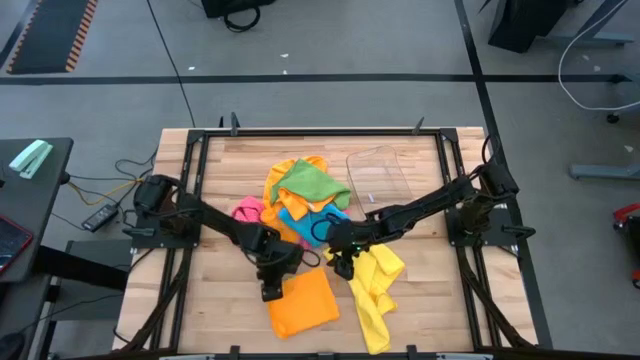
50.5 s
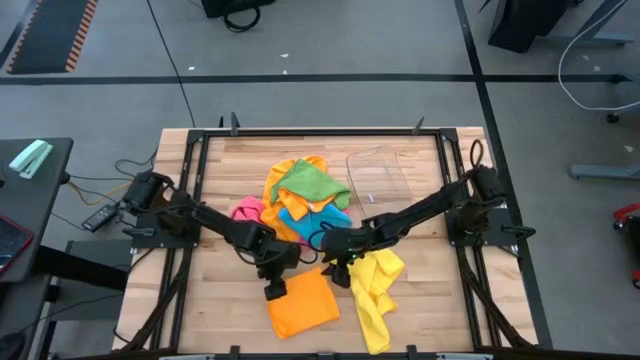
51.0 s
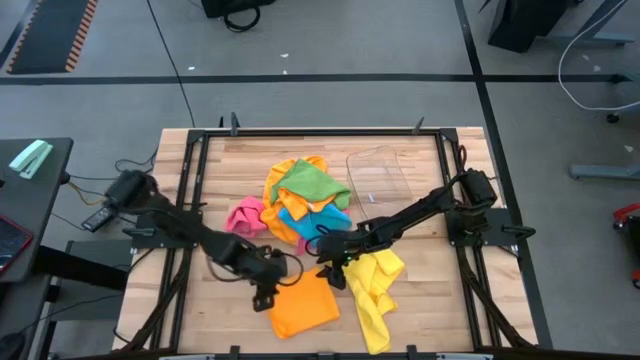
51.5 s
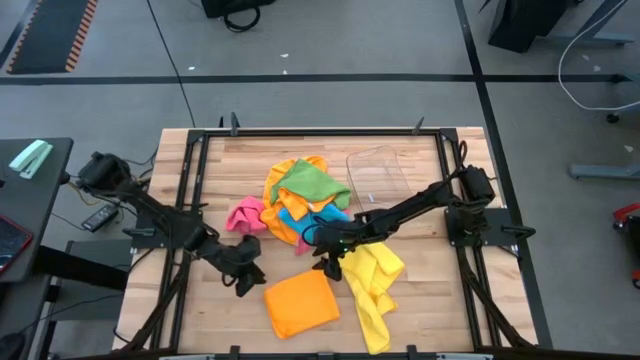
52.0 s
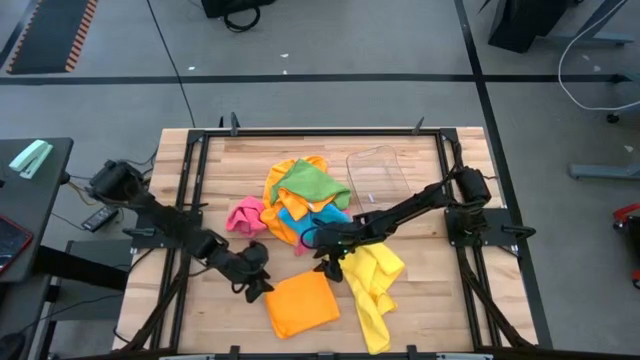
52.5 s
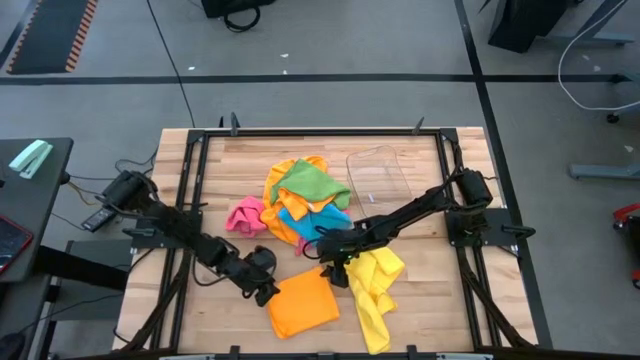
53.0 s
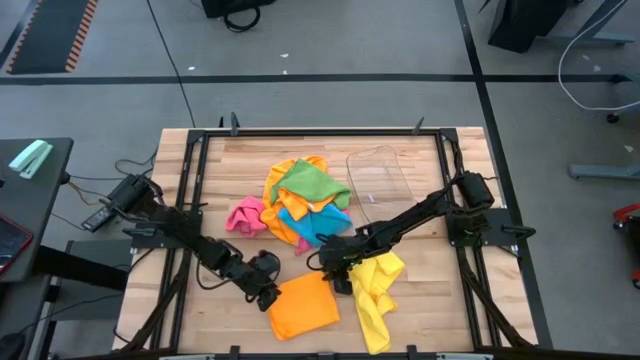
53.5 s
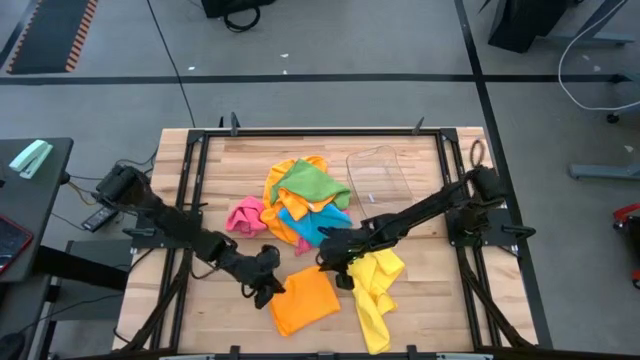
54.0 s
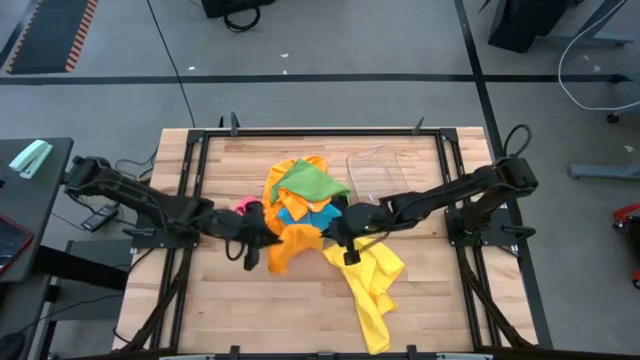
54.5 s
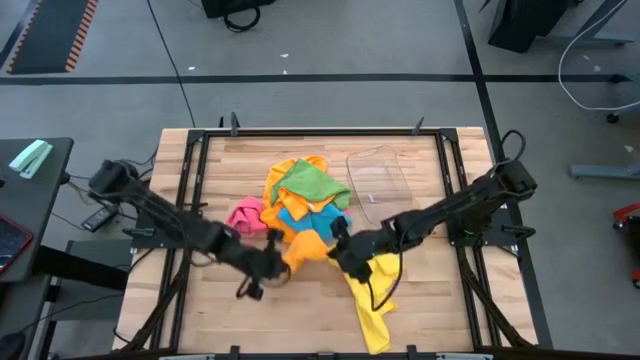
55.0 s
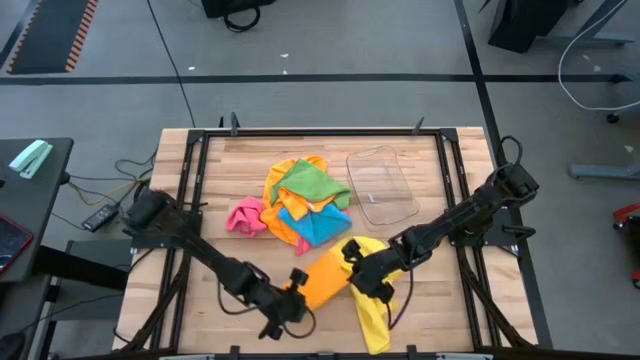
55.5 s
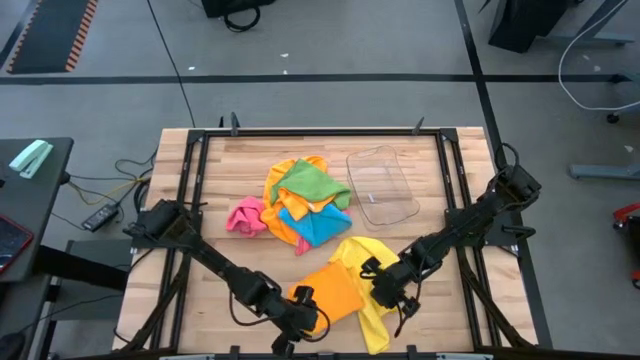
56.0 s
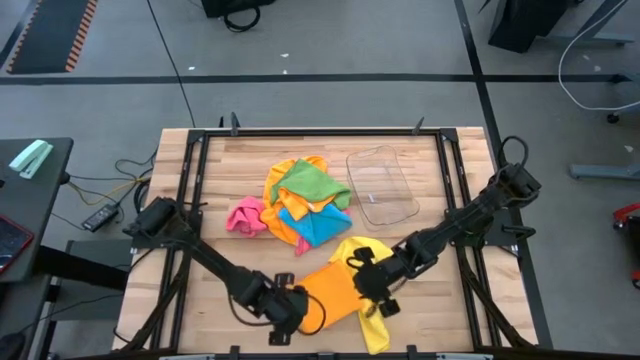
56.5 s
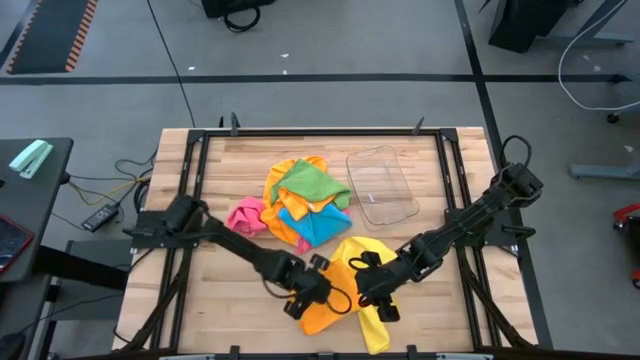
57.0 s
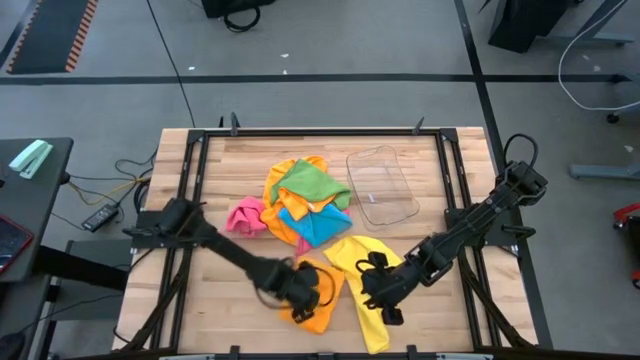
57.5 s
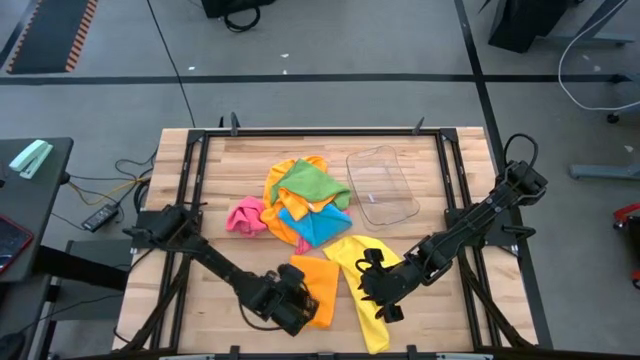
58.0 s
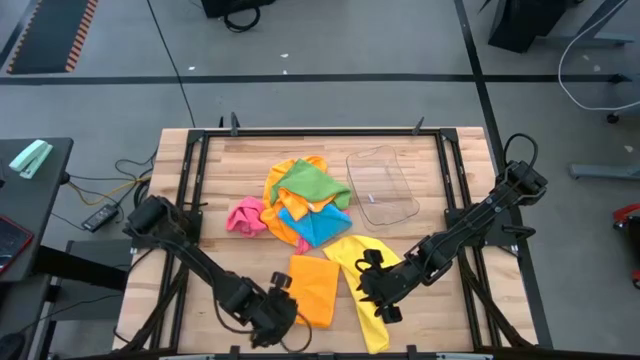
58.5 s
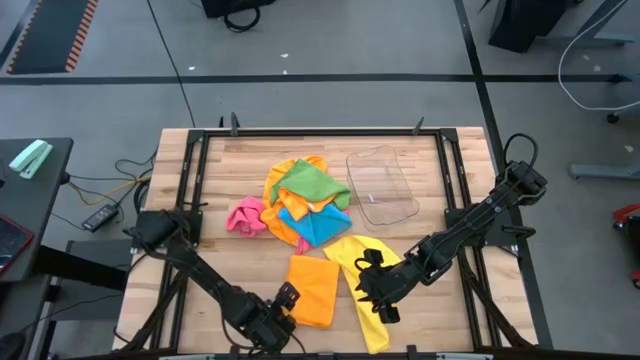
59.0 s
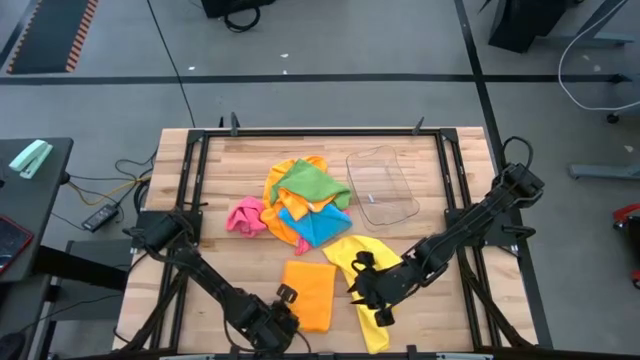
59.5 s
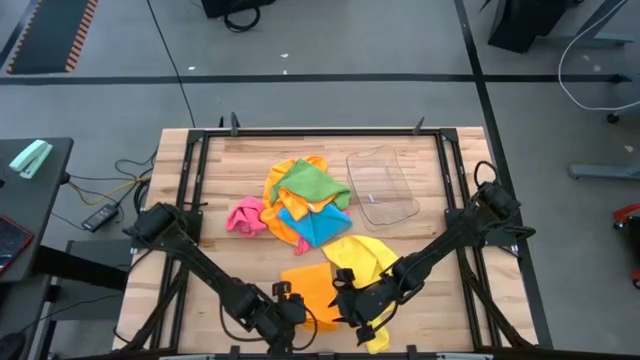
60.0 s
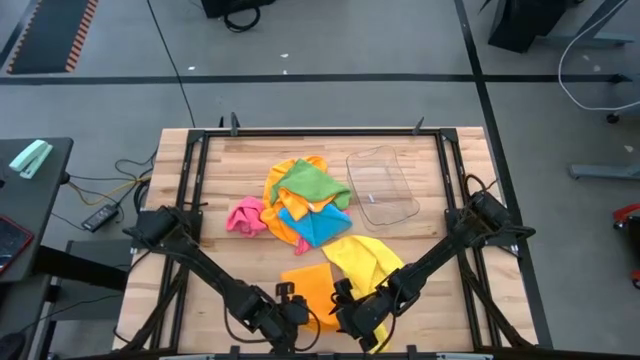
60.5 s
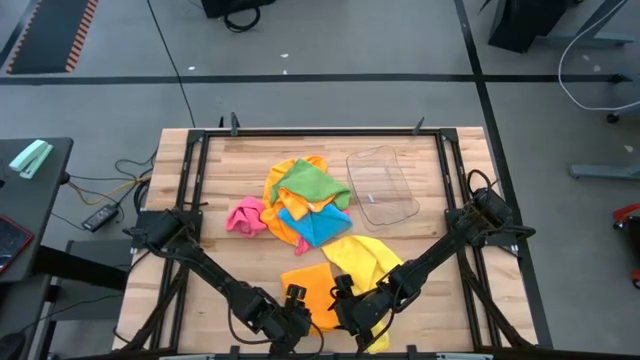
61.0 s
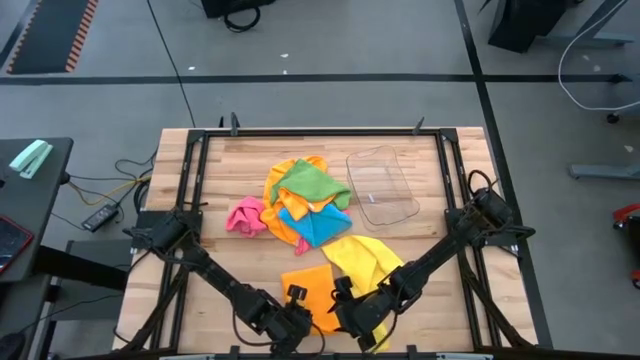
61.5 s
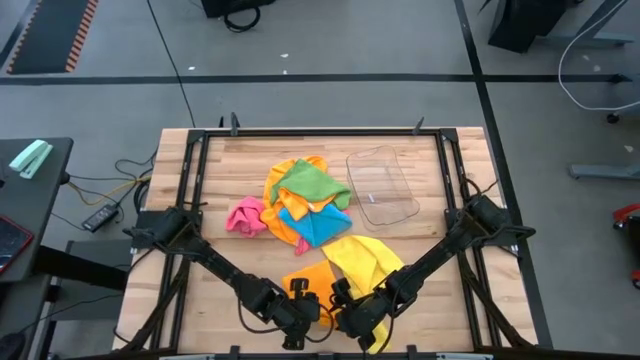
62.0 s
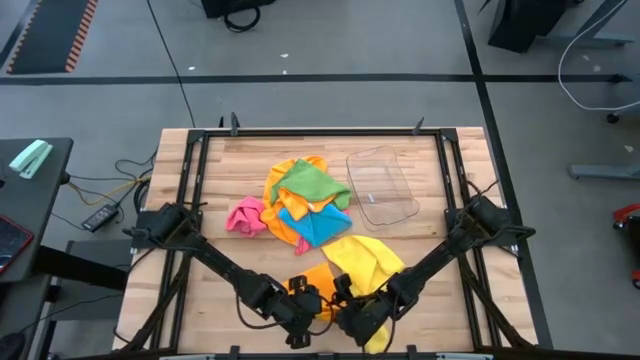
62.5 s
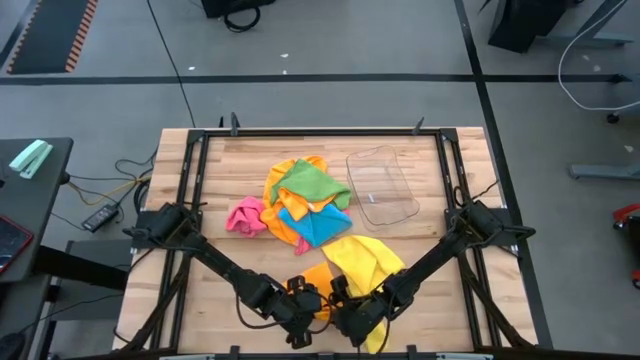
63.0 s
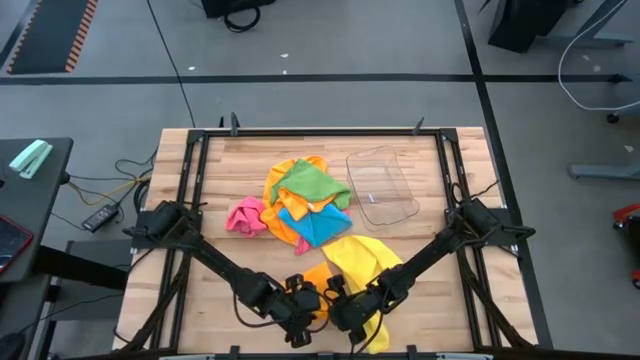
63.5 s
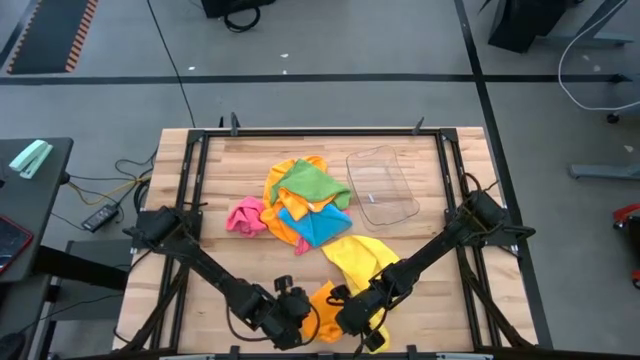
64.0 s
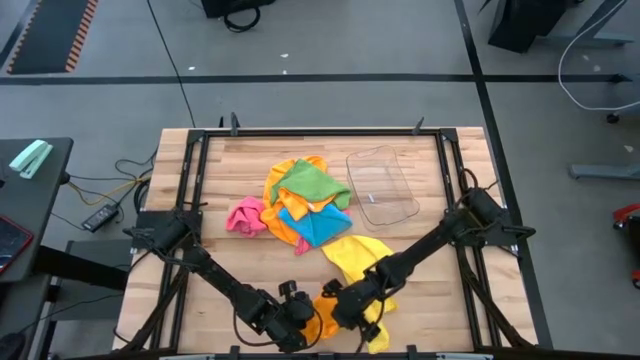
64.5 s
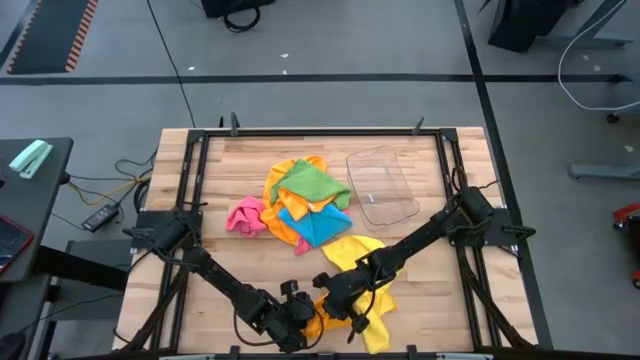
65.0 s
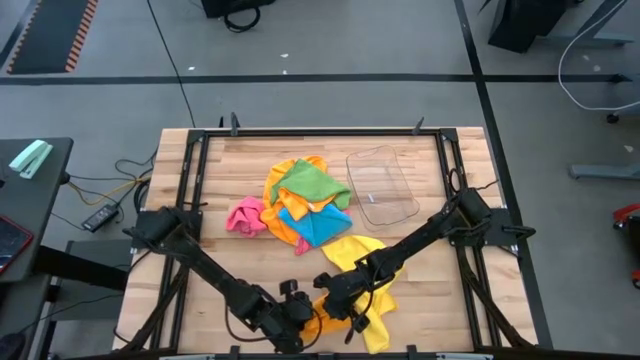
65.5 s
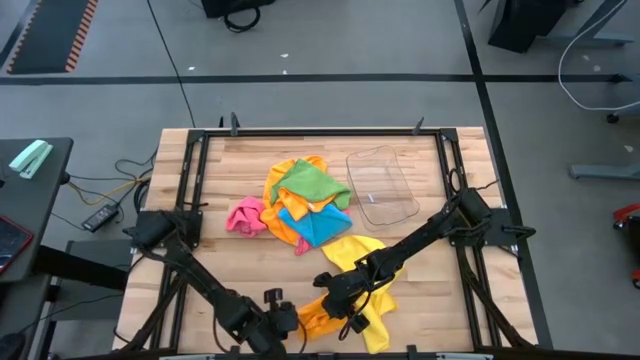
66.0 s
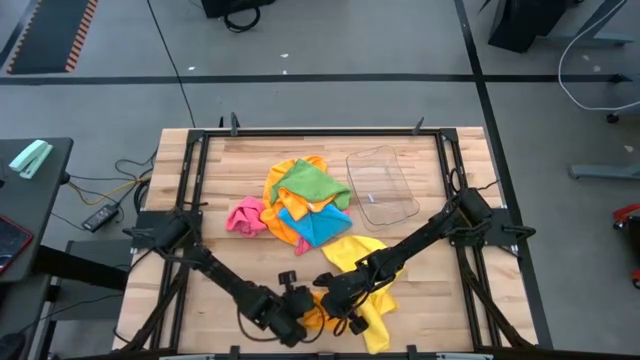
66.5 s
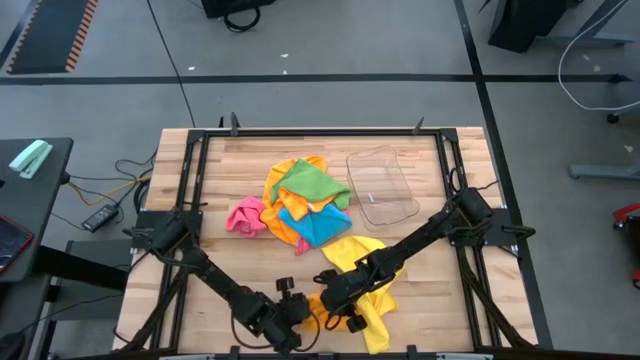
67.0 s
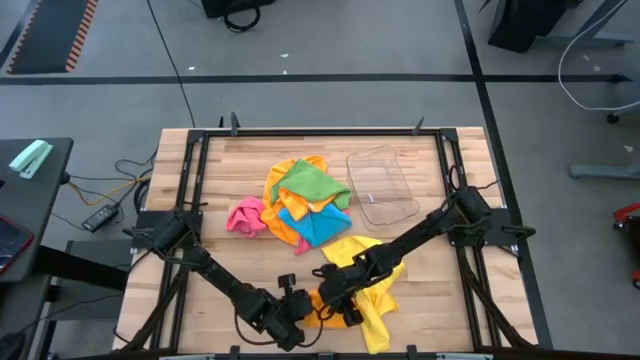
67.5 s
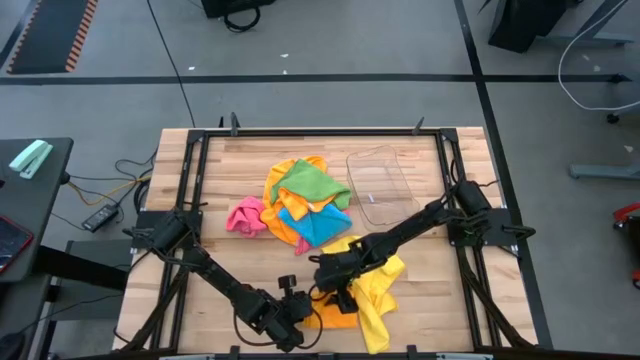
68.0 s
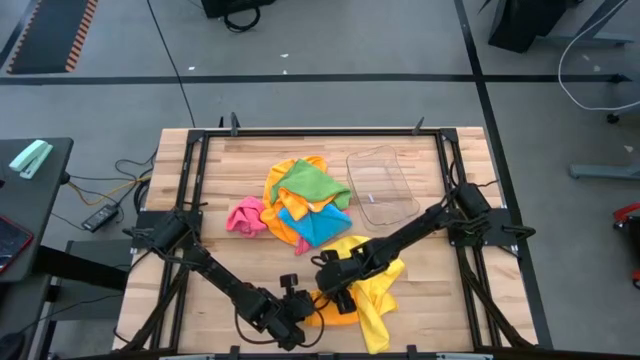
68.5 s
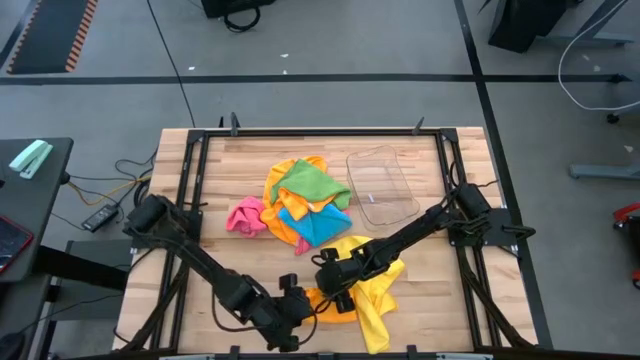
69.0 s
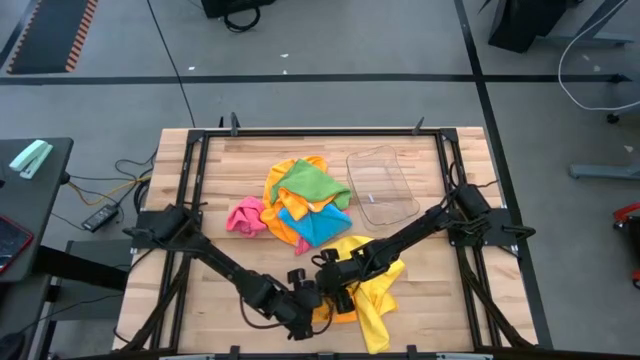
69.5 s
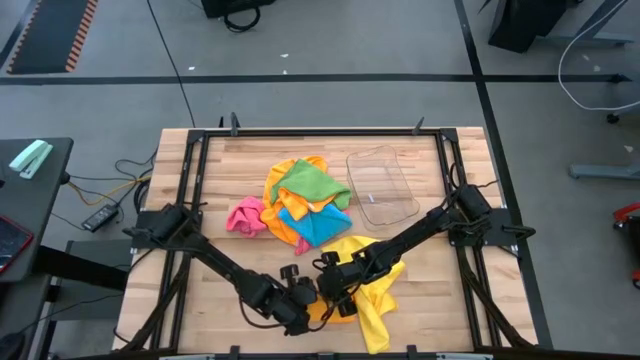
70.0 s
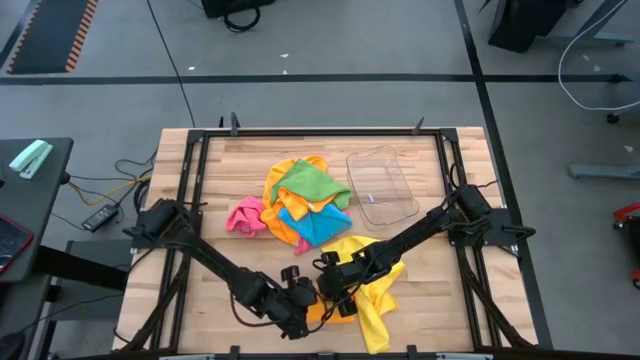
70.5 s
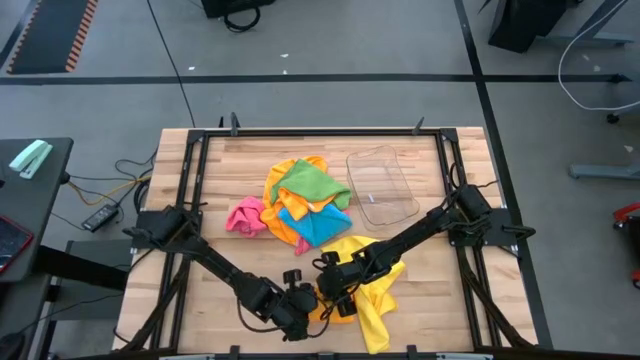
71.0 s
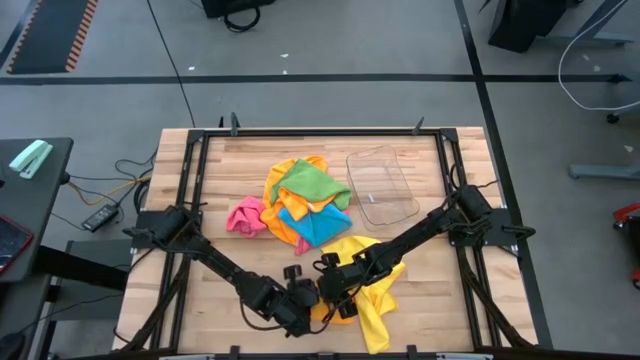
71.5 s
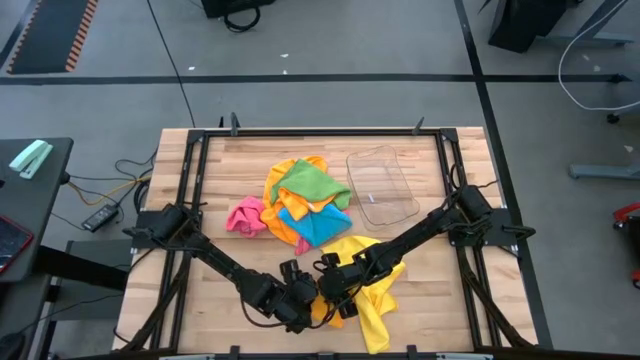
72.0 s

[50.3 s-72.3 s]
Task: Fold microfiber towels
Fold the bottom orange towel

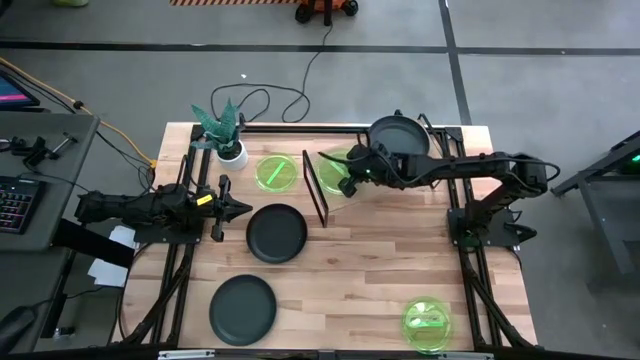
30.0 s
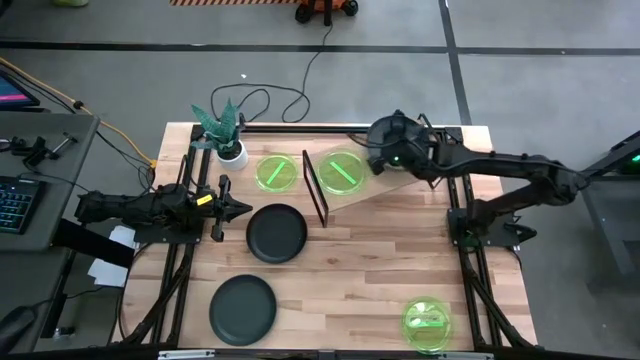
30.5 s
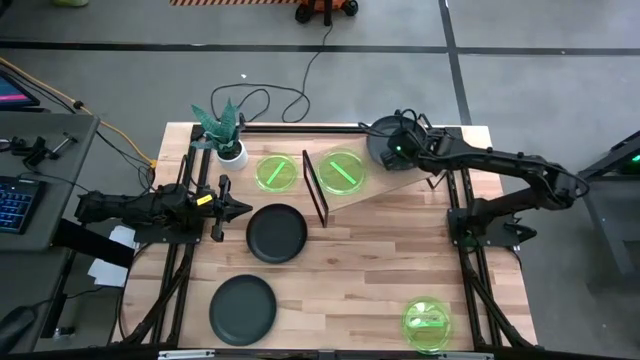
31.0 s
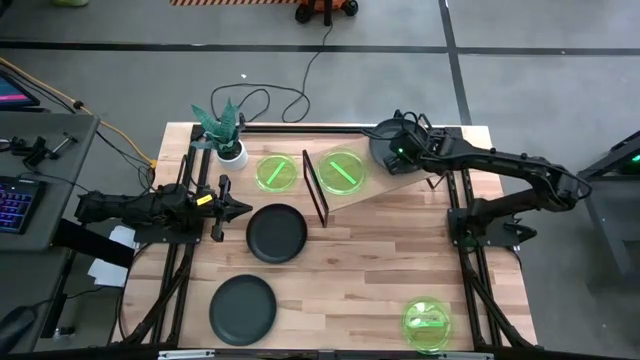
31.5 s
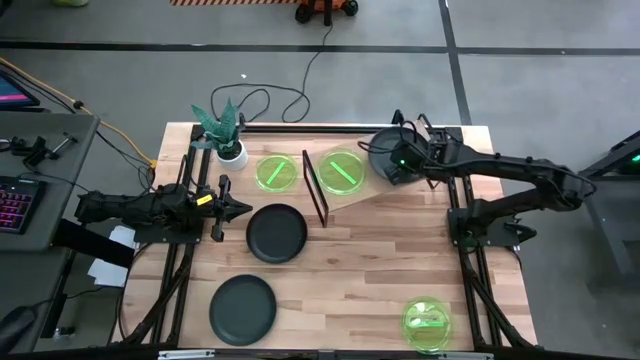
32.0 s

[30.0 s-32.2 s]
Task: Place and stack plates onto a shelf
Adjust the black plate on the shelf
